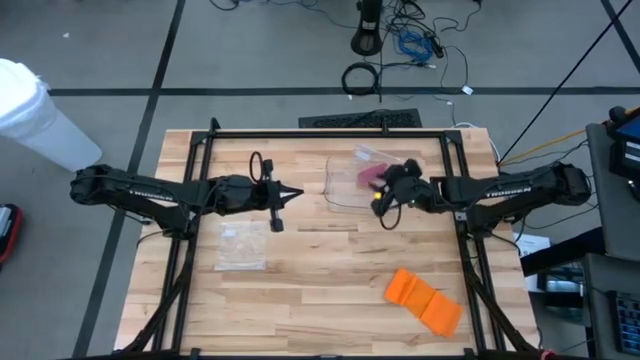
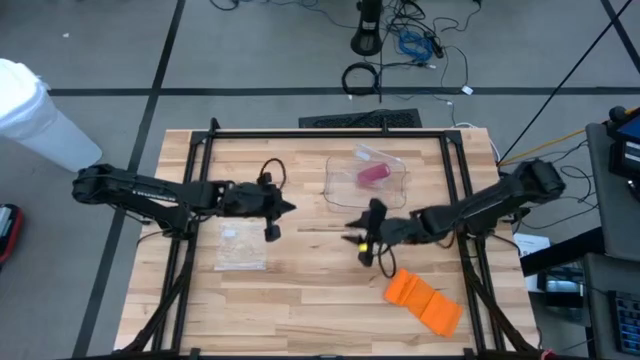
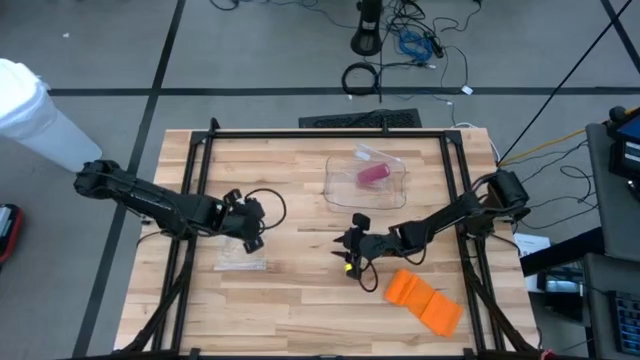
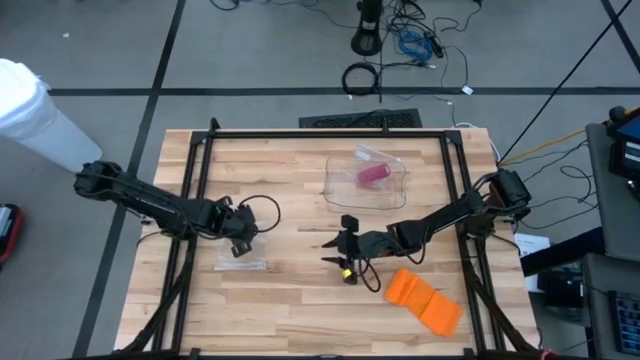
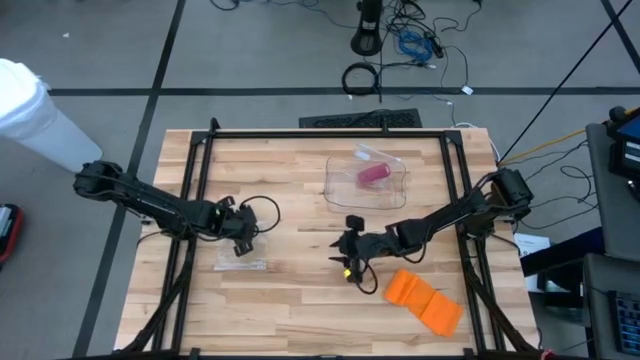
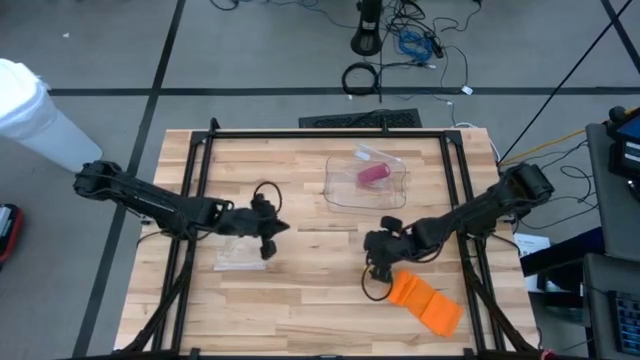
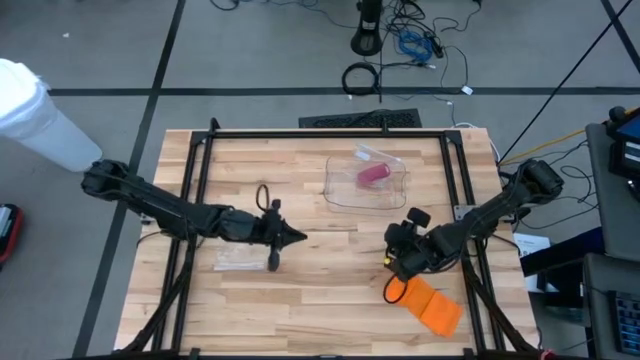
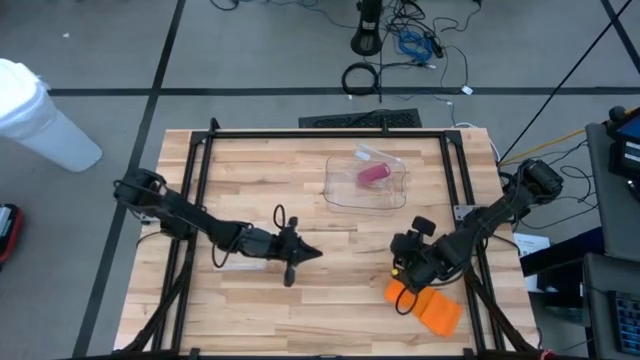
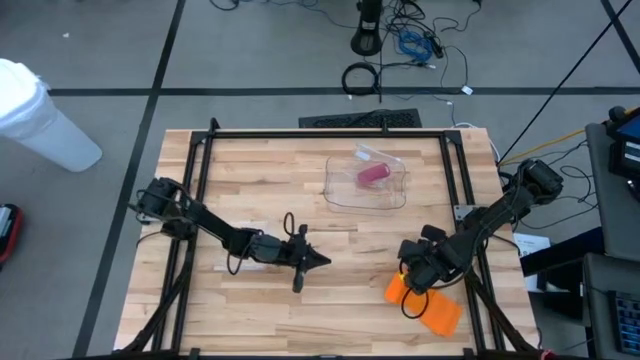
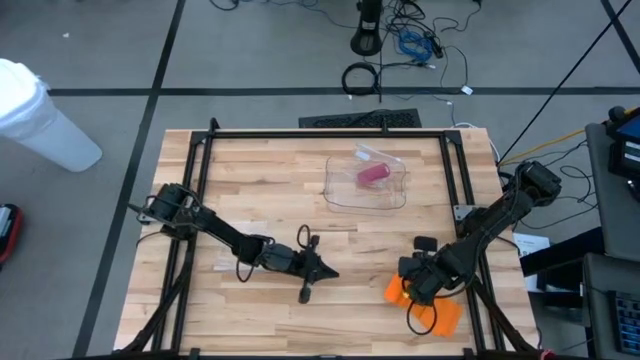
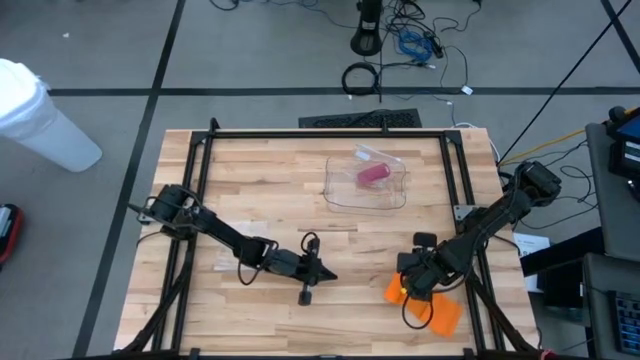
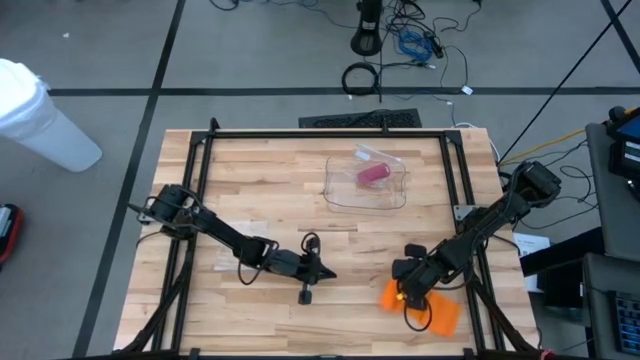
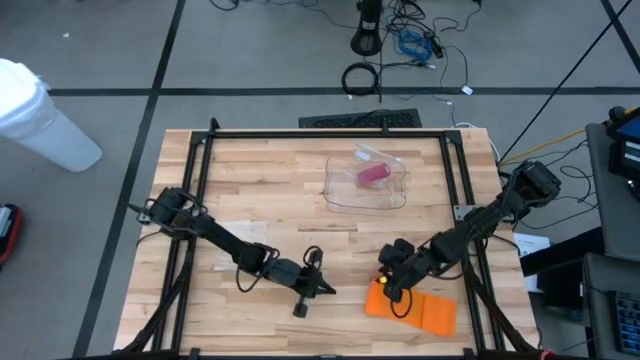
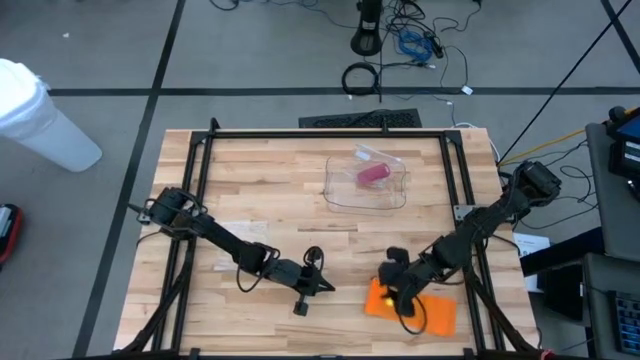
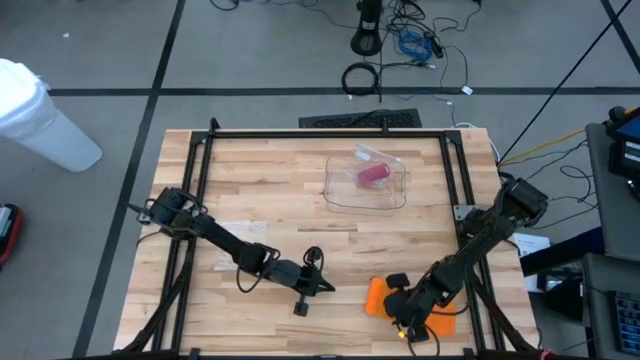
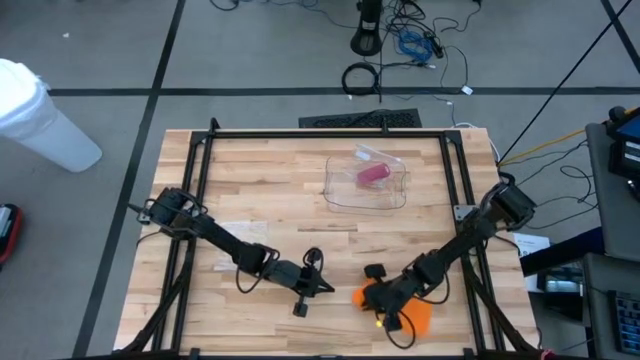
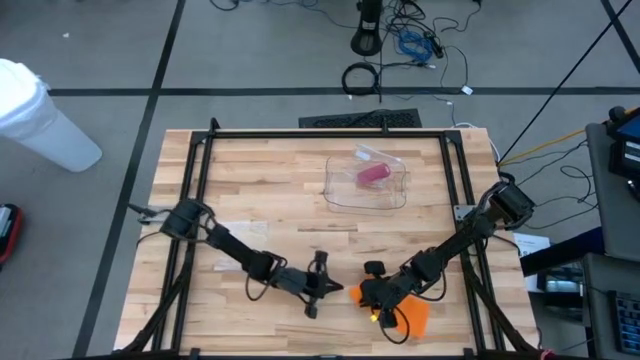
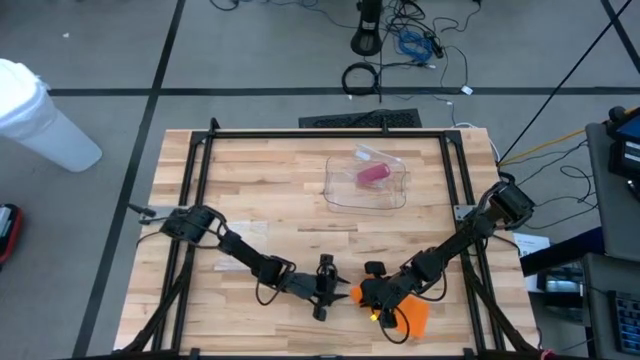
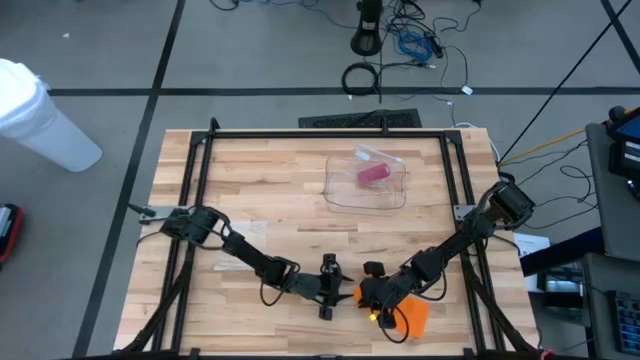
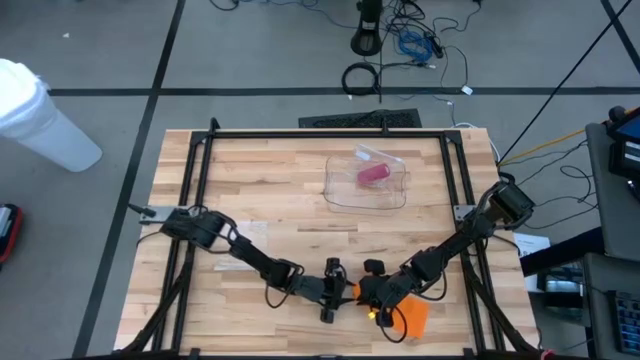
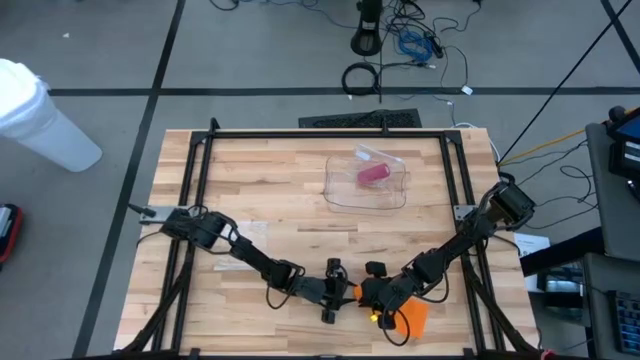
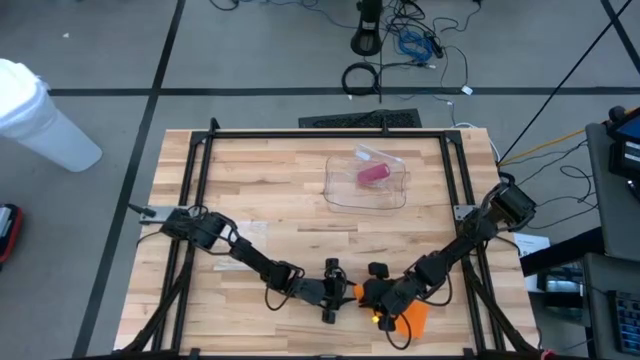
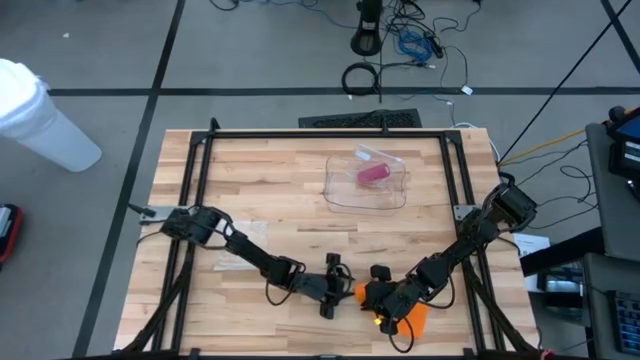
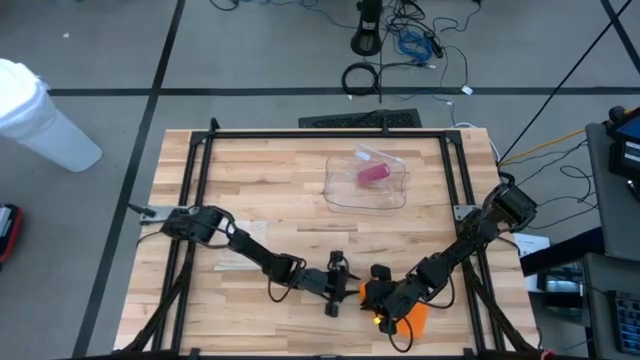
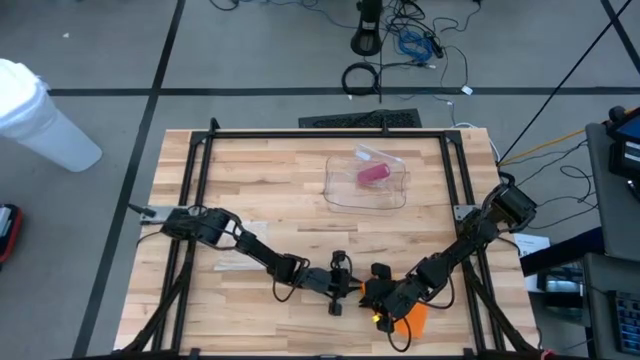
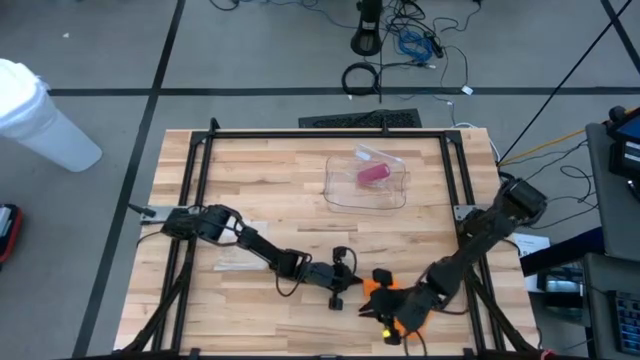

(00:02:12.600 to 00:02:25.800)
Task: Roll bandage
Roll the orange bandage

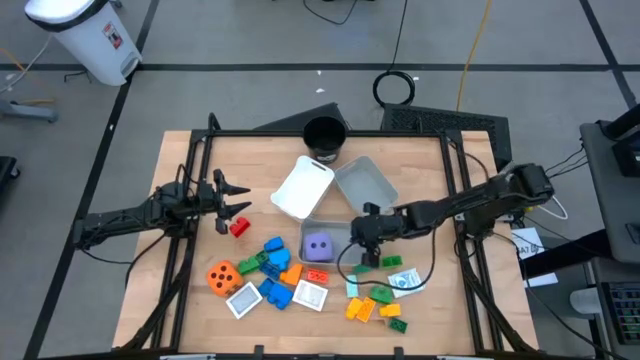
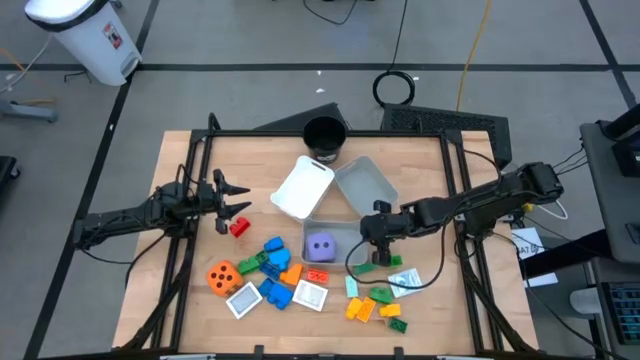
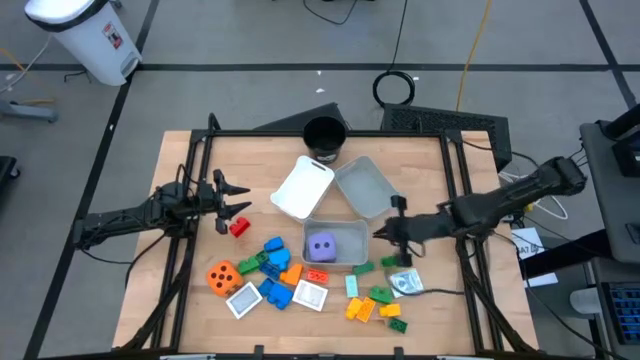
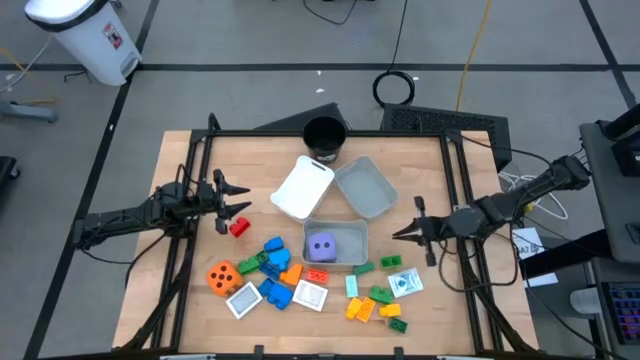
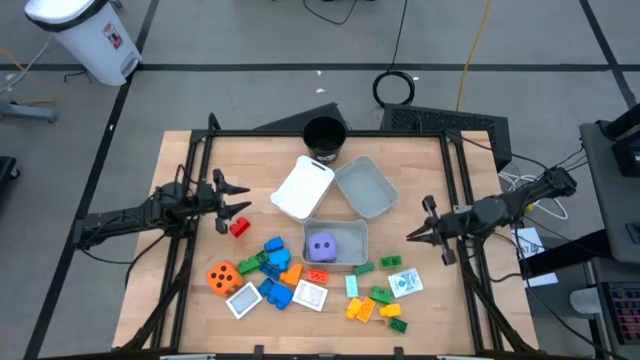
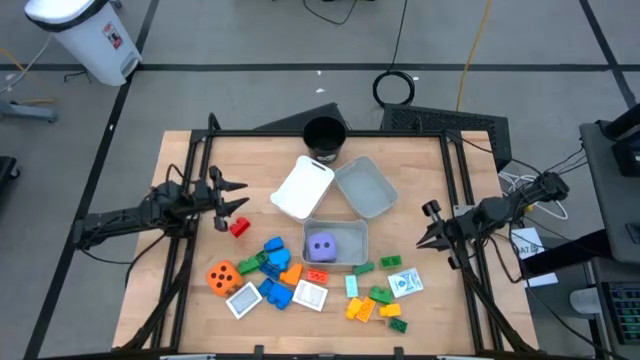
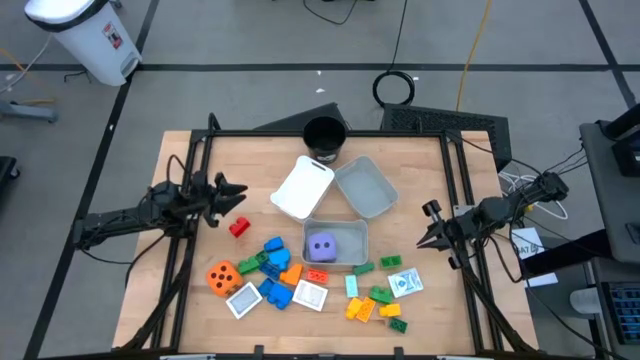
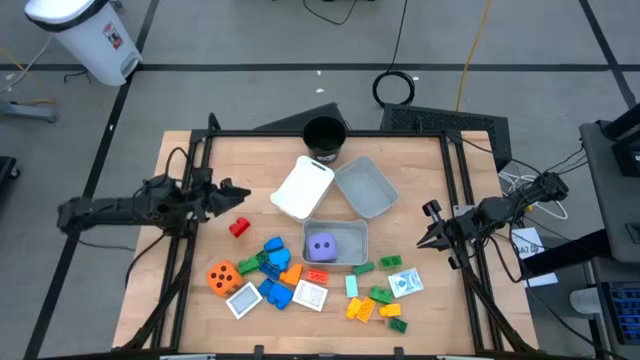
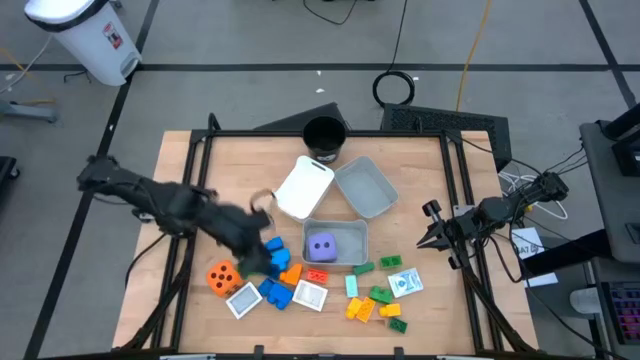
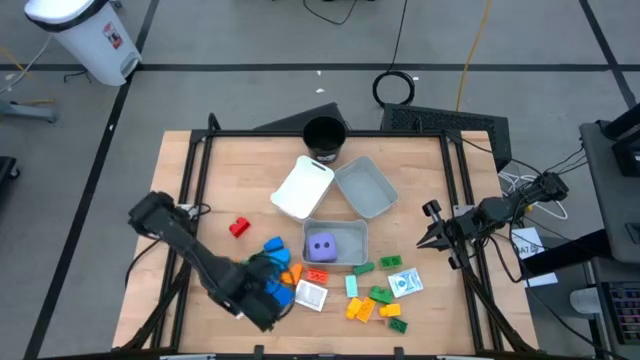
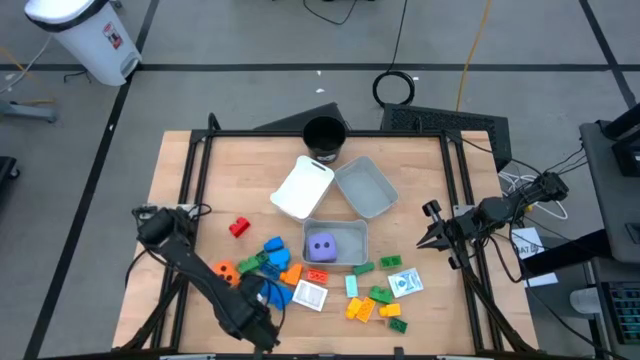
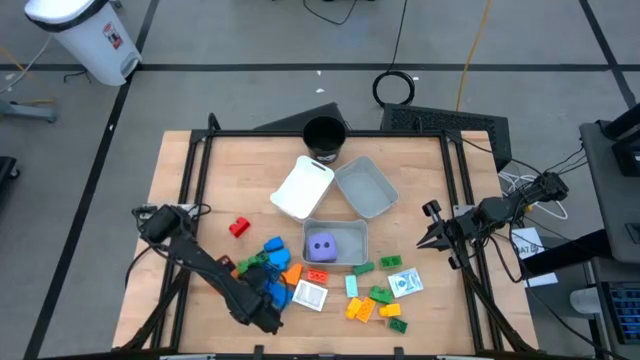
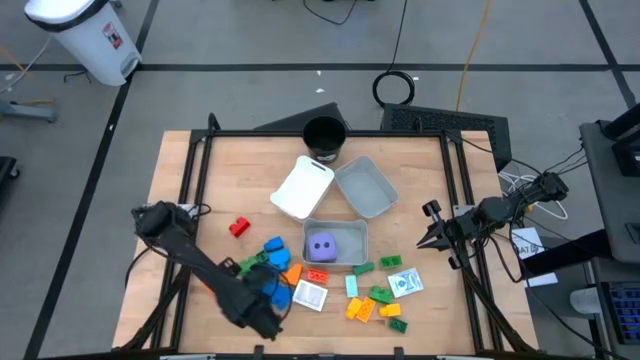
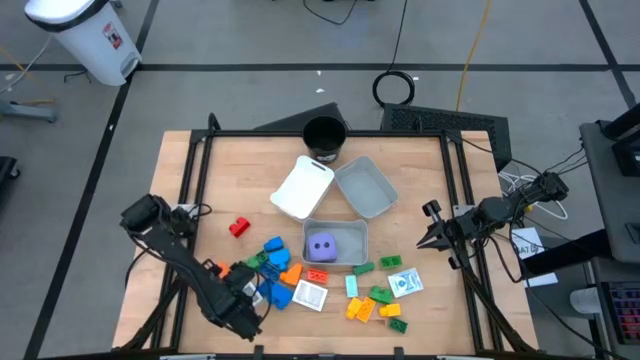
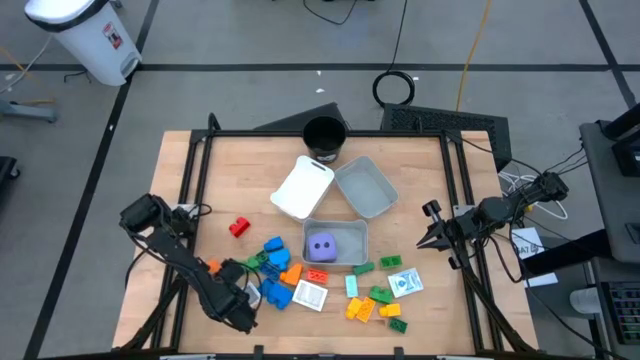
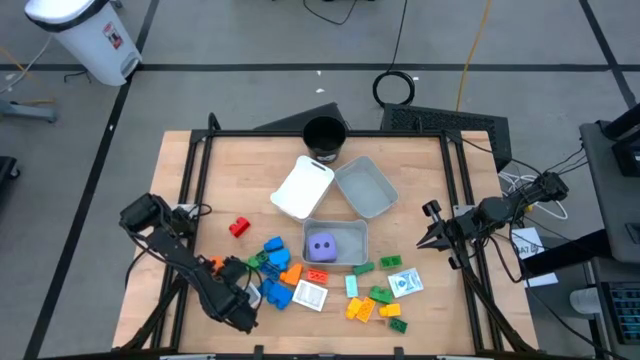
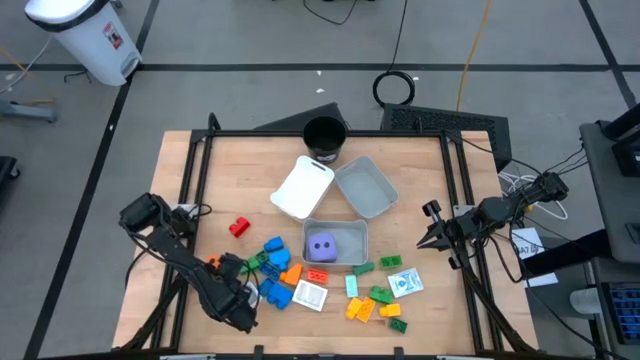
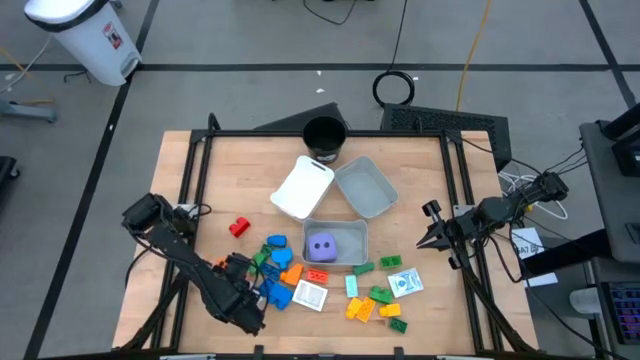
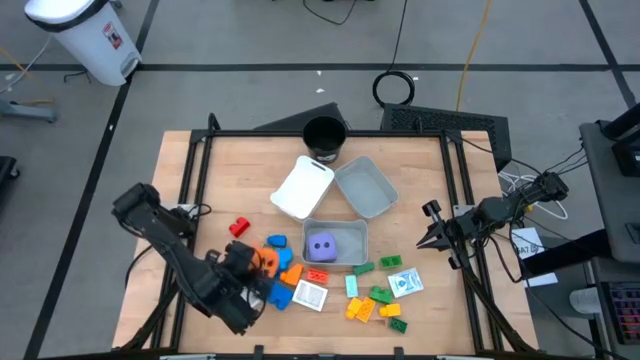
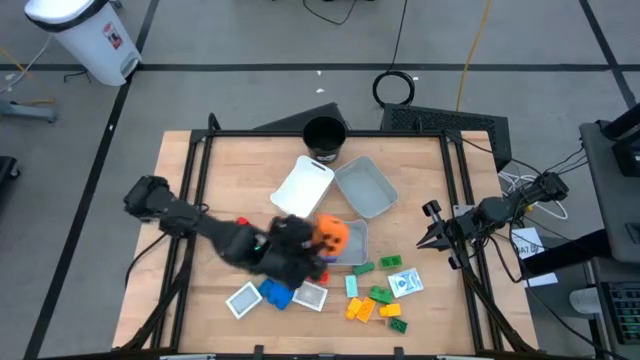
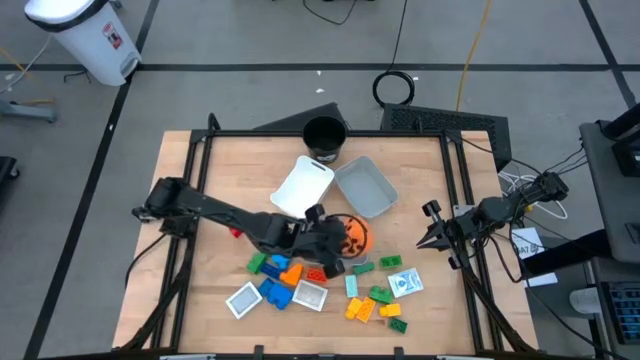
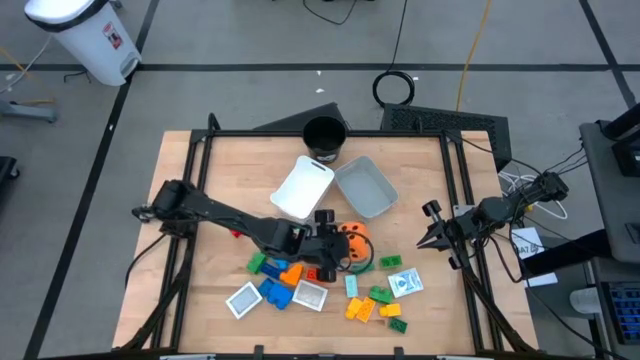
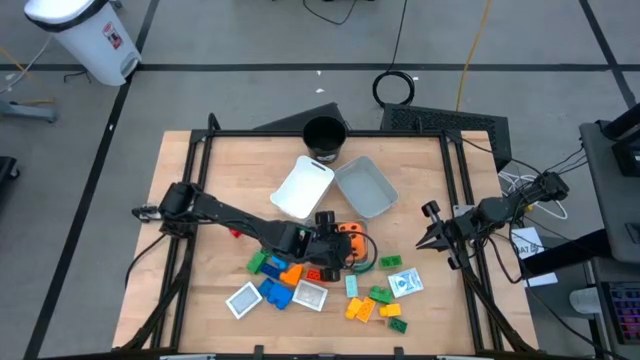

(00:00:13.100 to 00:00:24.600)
Task: Pick & Place Toys
Put the orange die into the bottom gray bin
